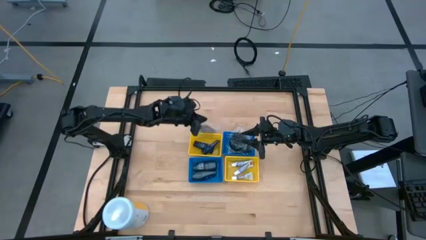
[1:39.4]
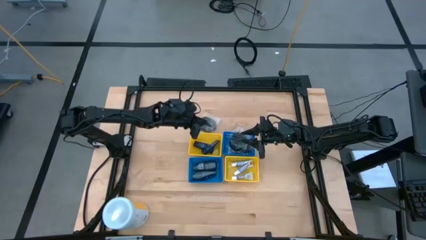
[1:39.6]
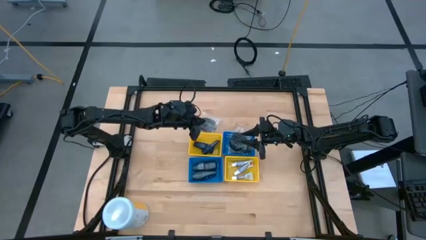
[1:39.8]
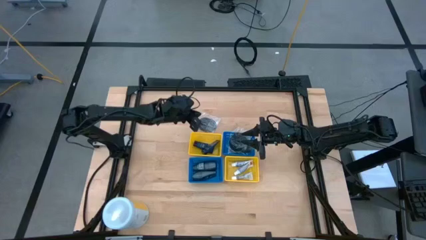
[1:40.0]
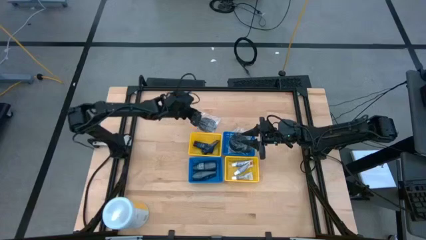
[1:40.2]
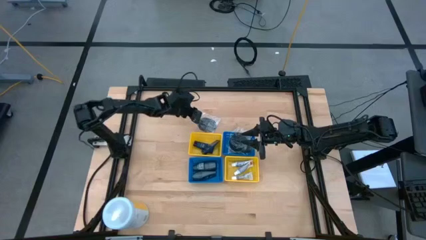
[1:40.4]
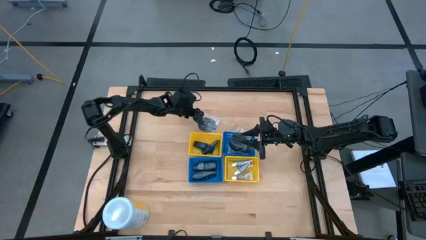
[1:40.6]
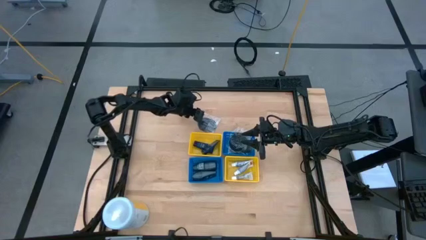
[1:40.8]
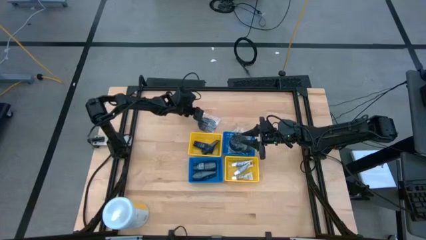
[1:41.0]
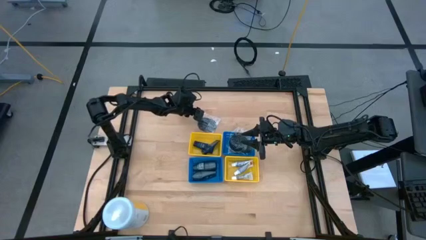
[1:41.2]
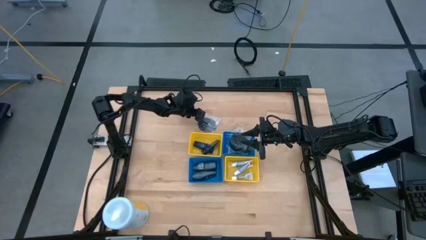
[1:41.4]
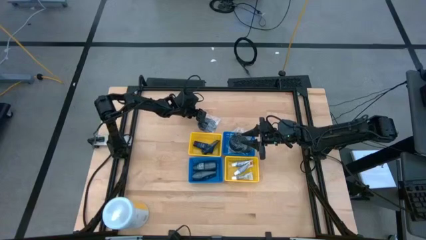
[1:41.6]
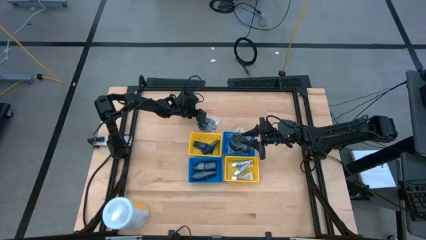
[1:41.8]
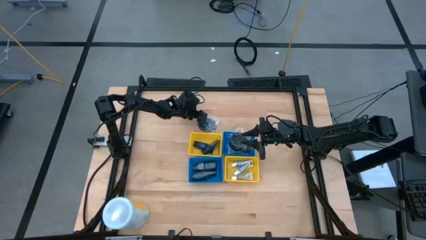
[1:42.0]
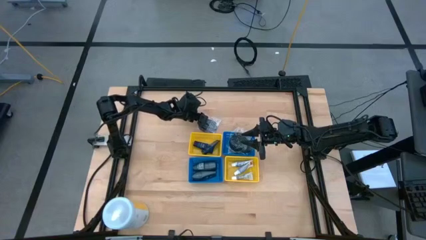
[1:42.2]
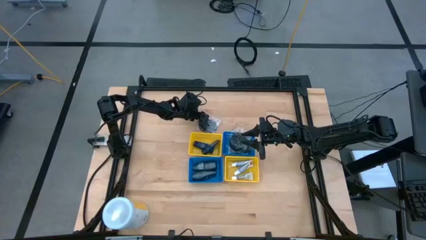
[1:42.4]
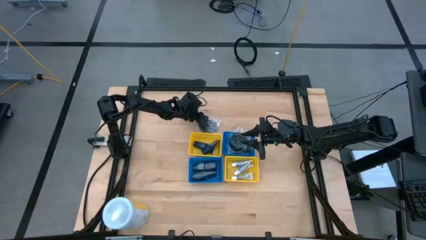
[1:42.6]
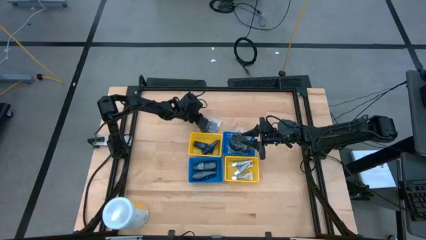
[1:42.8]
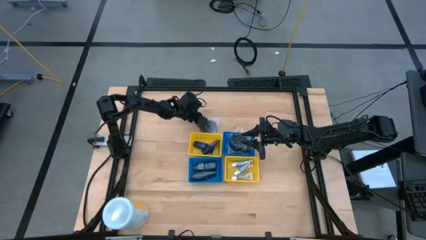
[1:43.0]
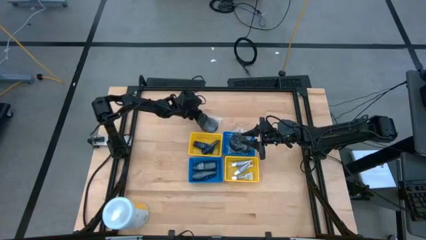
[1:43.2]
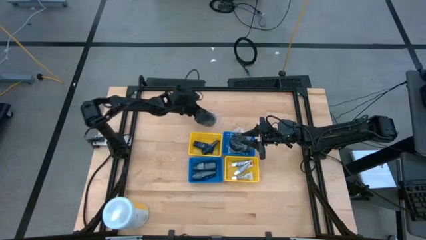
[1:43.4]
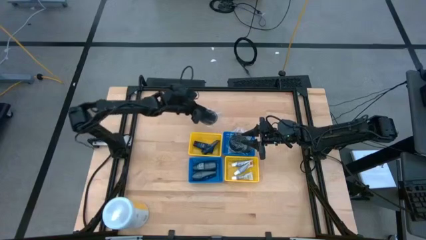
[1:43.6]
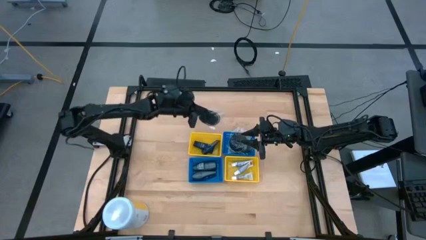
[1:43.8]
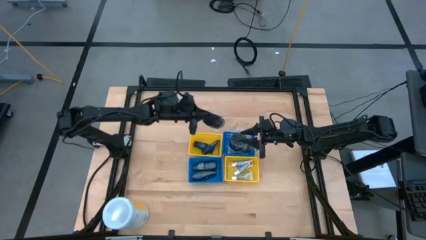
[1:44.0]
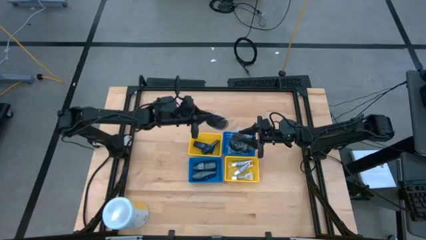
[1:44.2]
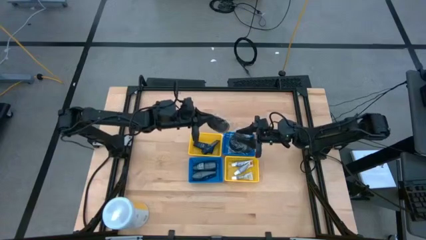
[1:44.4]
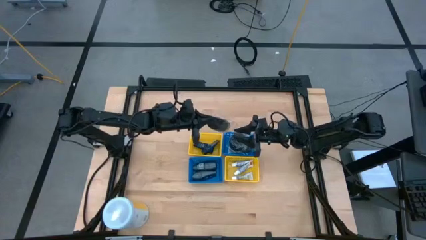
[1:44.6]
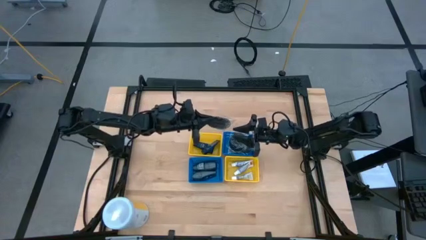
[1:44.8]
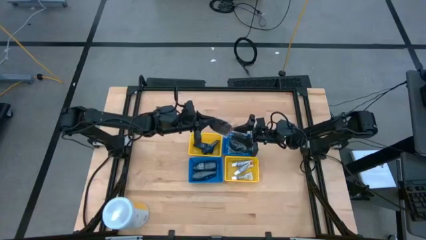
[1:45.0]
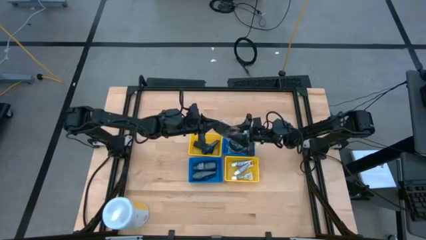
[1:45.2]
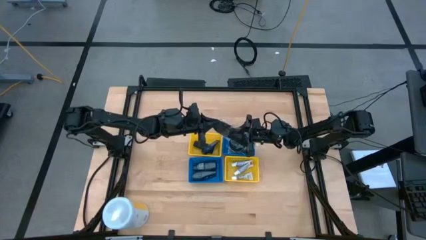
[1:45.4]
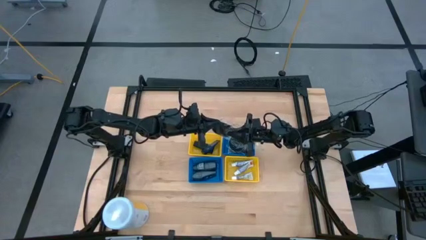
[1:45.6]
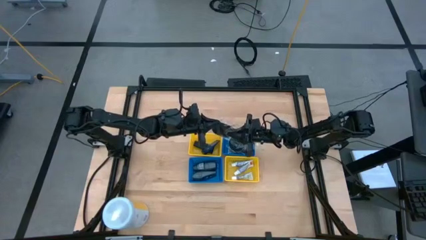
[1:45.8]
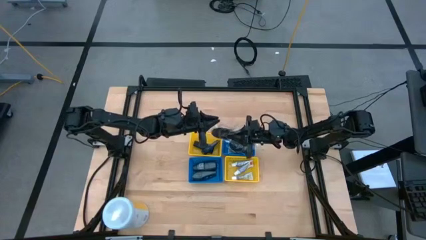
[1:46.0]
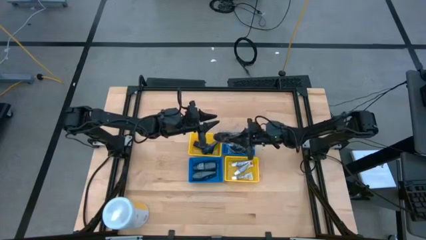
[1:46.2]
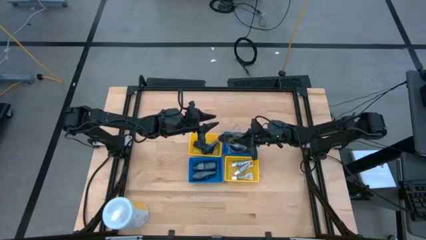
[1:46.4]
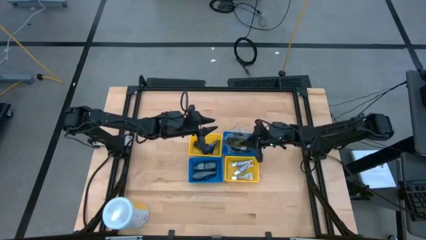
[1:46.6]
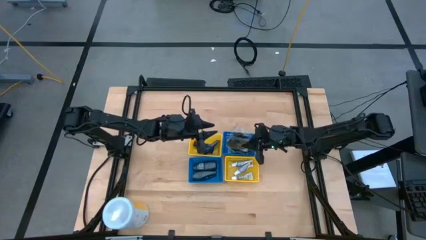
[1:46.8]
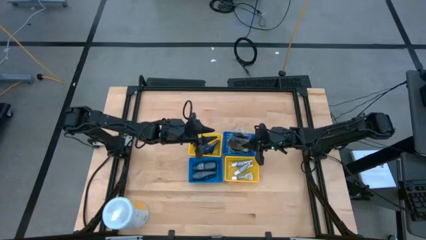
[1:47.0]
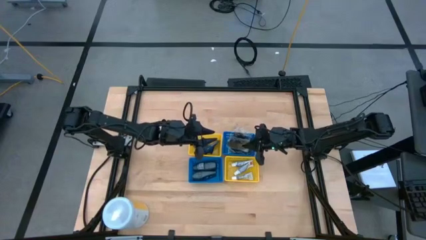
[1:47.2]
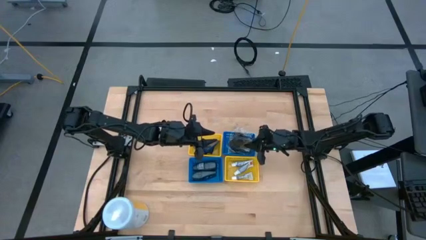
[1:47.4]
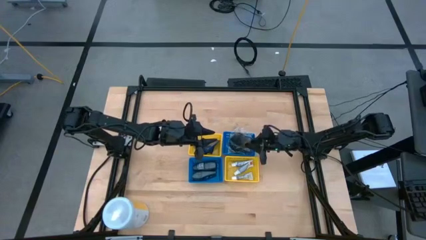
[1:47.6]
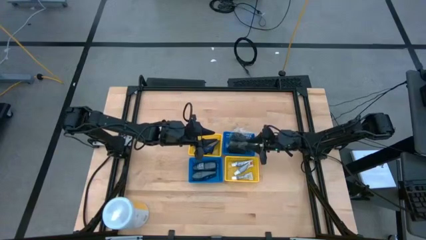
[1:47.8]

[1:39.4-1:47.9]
Task: Pick & Place Travel size toiletries
Put the black hairbrush into the right blue bin

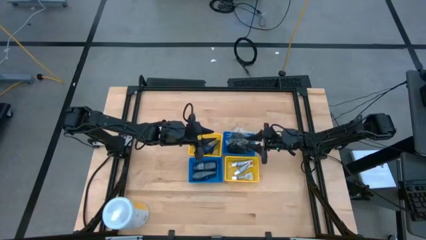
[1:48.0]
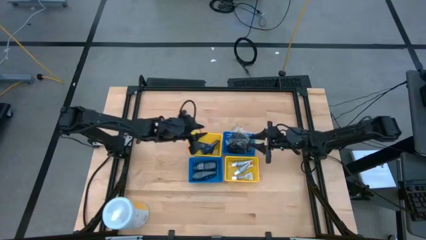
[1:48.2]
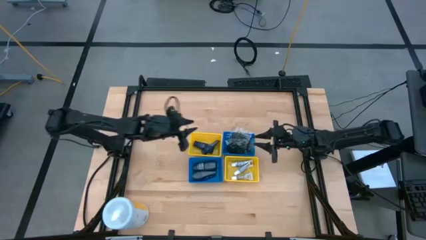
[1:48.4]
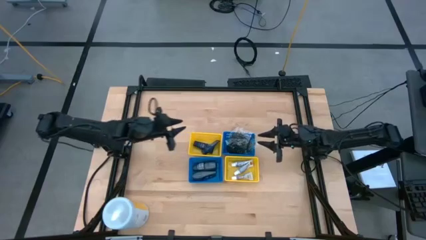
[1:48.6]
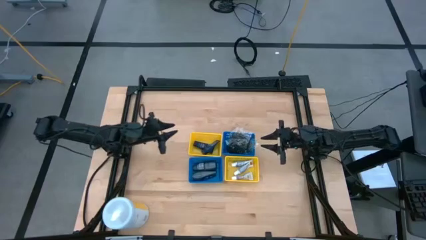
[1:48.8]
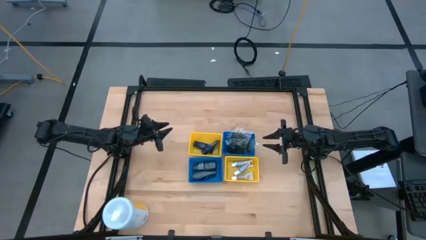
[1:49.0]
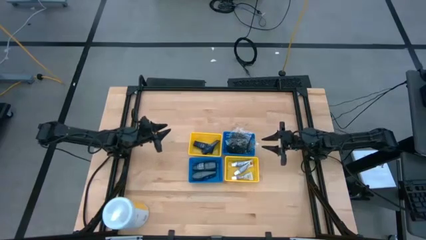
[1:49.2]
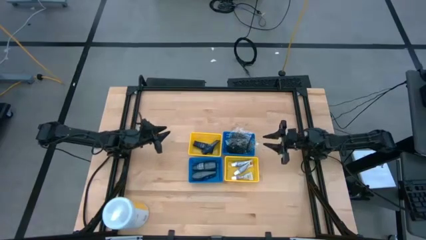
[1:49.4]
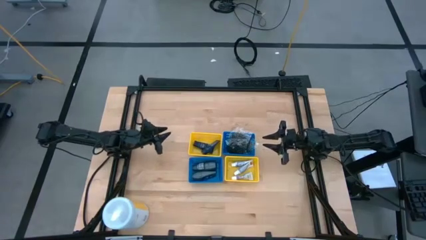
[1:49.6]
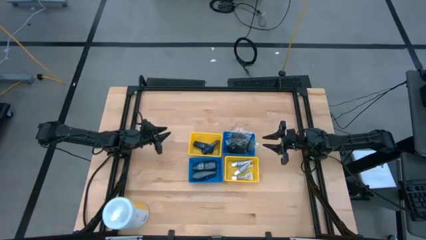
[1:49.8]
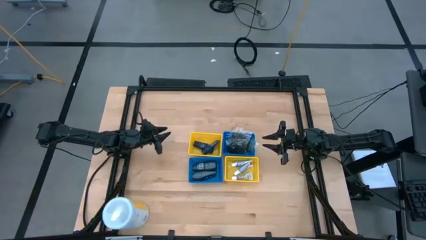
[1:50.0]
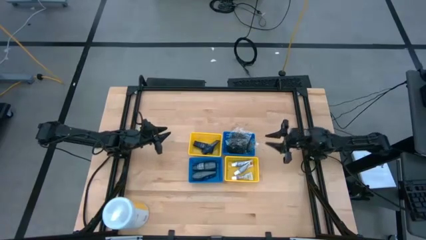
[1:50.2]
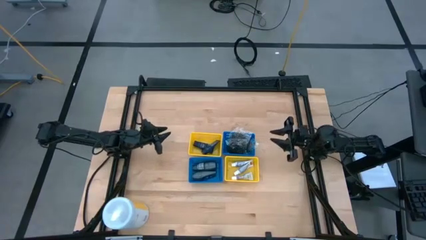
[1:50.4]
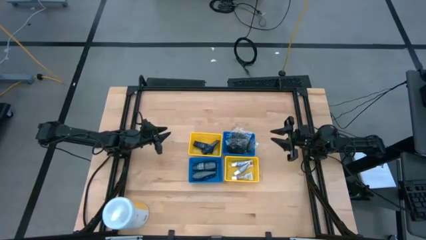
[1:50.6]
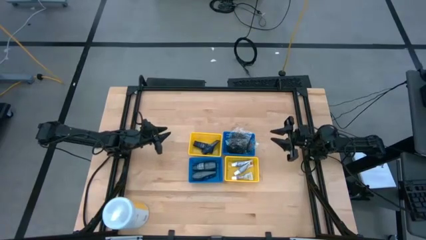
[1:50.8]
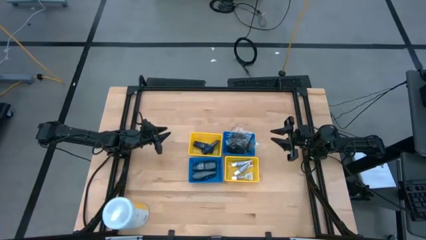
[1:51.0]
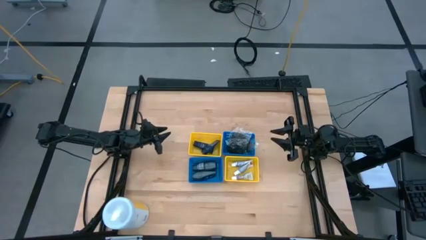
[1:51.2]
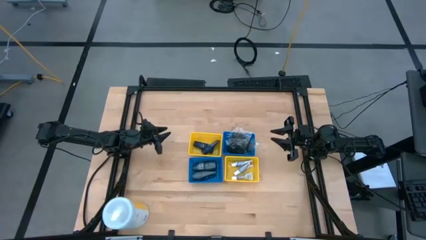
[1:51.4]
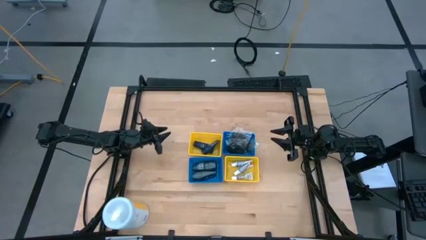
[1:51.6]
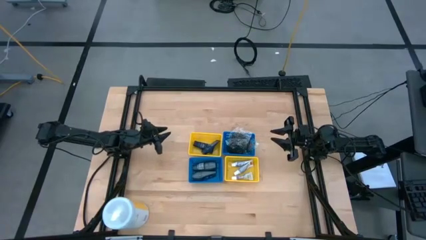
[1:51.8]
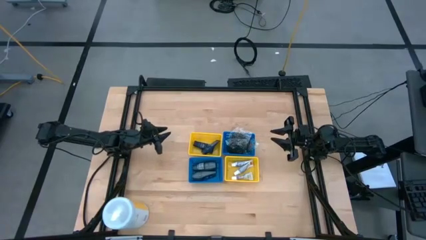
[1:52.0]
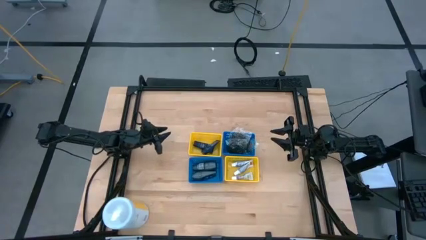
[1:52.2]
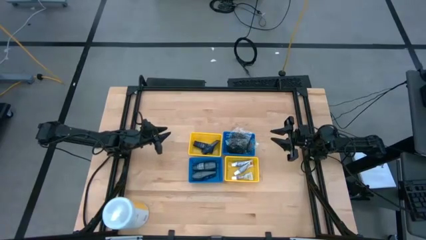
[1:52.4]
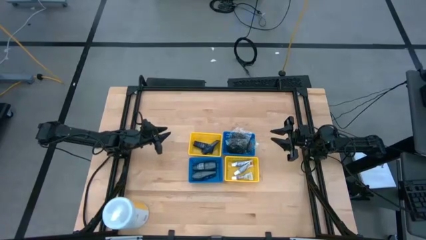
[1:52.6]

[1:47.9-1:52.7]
Return to Home Position

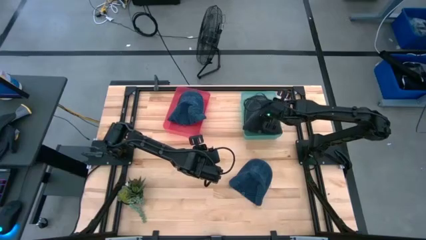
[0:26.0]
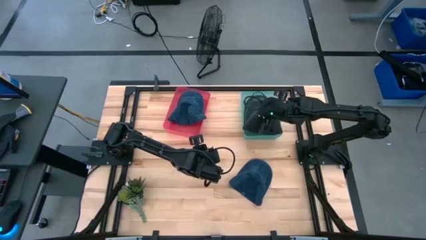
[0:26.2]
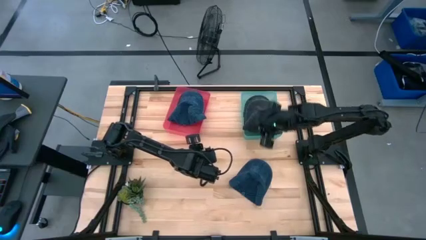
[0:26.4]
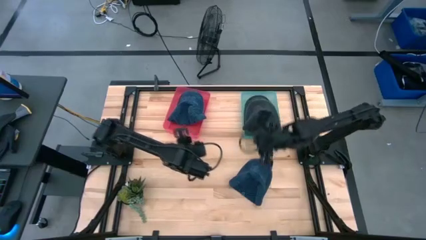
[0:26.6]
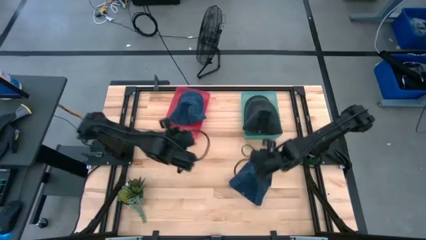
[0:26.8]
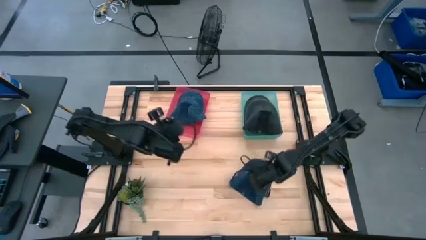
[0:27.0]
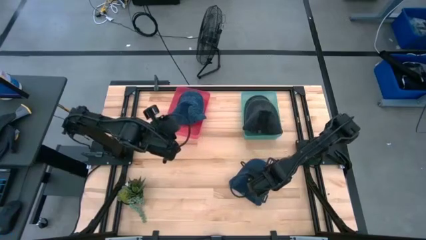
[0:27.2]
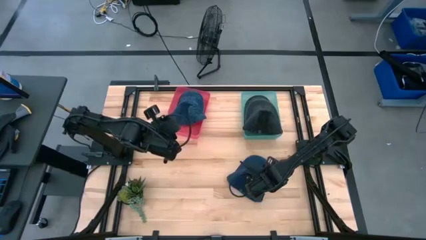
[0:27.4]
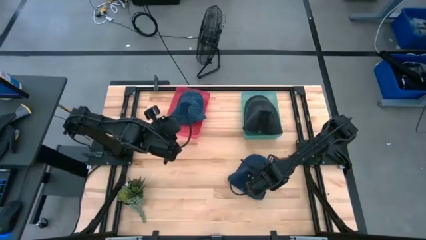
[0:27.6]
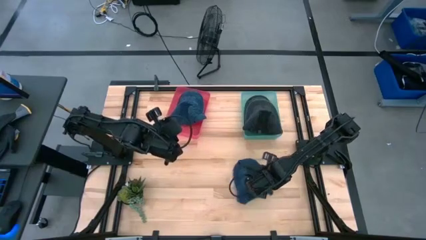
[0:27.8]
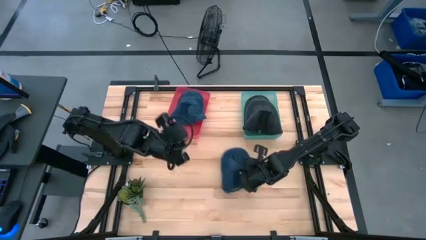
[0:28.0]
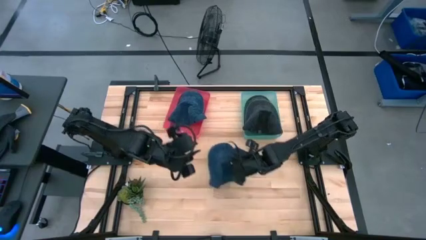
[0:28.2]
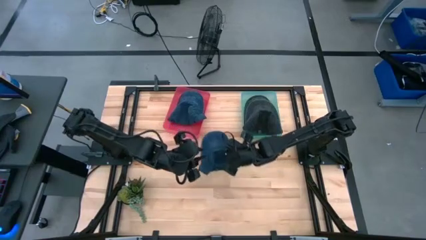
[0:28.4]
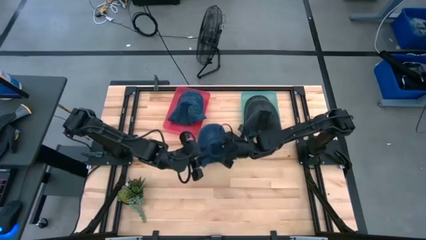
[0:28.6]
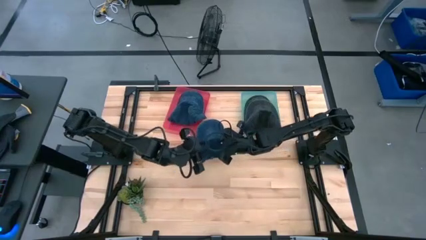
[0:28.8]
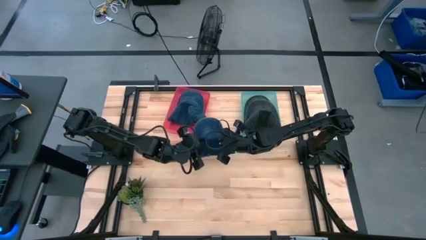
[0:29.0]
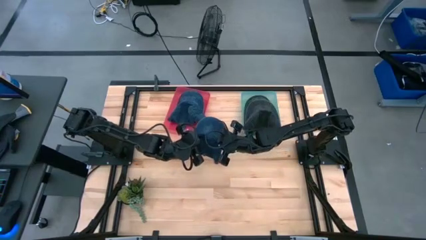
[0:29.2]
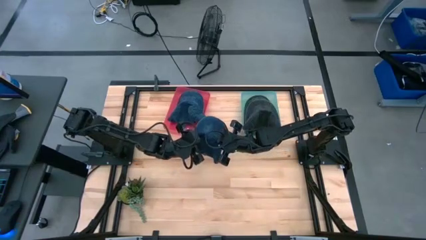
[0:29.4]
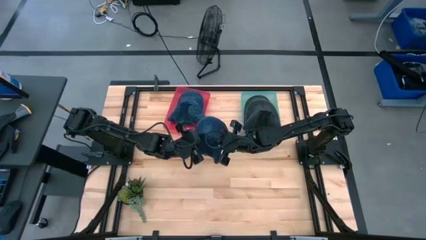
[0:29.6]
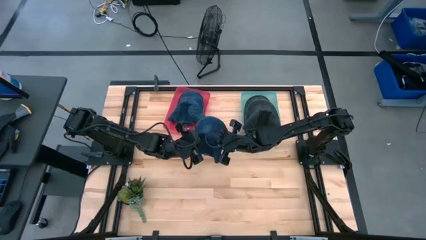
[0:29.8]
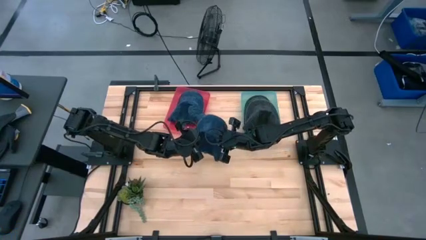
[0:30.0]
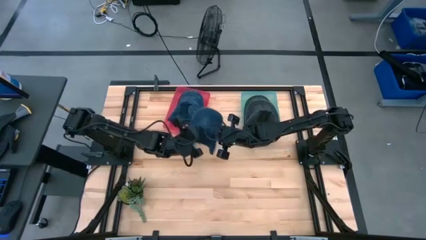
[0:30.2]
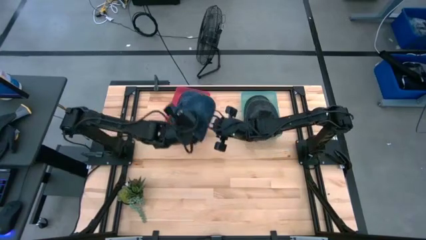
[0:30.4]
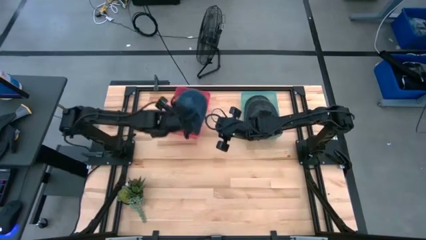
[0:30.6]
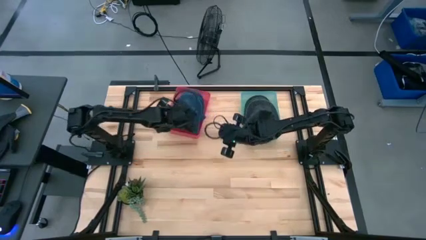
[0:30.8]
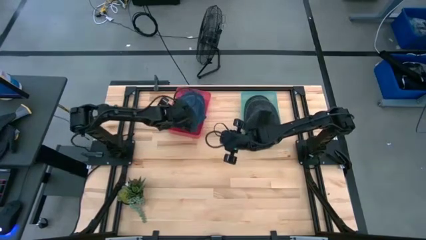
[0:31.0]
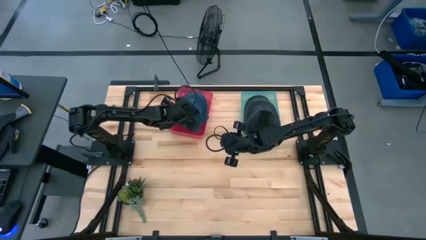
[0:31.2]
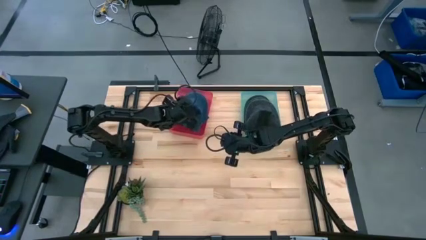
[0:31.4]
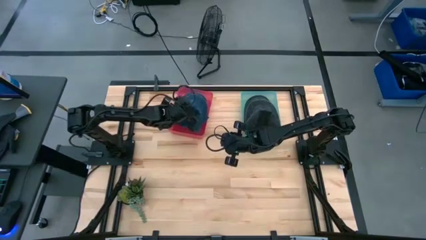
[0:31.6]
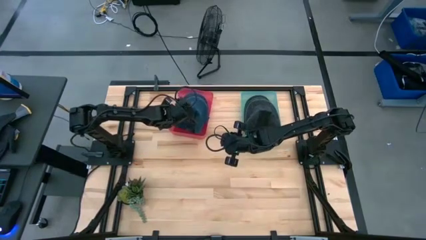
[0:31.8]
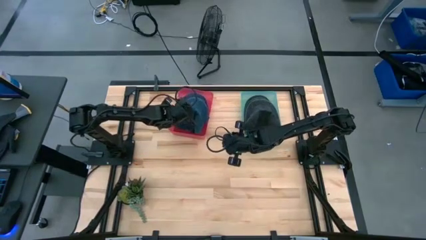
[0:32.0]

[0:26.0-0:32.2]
Task: Pick & Place hat
Put the blue cap into the red bin
